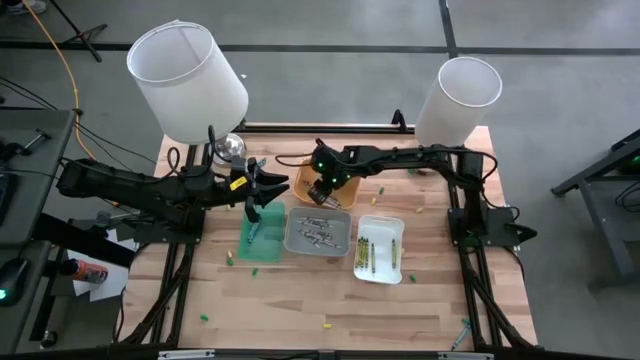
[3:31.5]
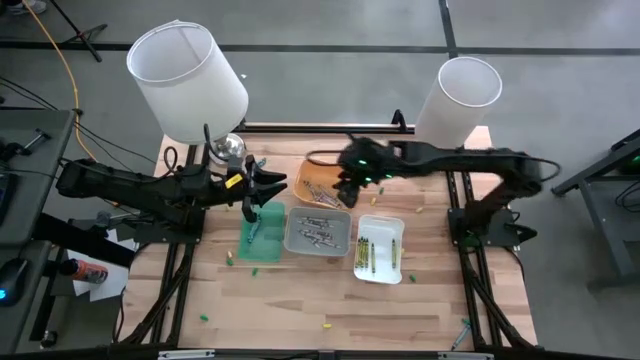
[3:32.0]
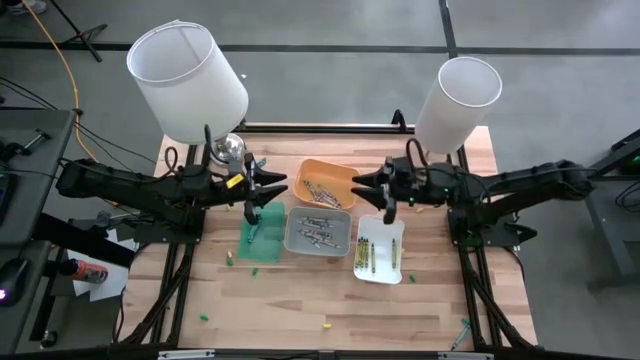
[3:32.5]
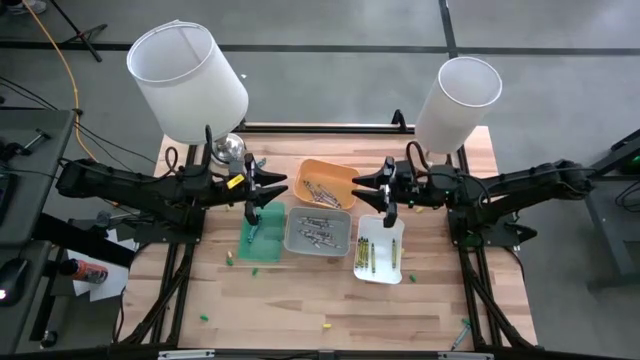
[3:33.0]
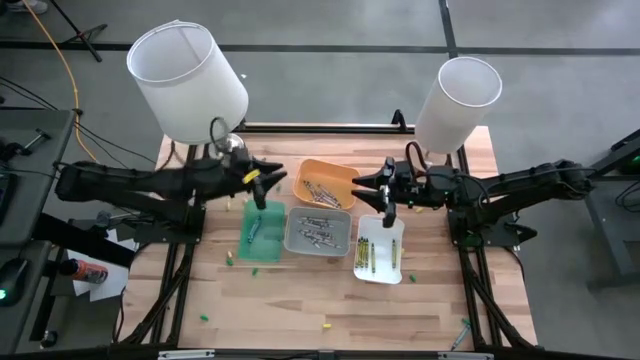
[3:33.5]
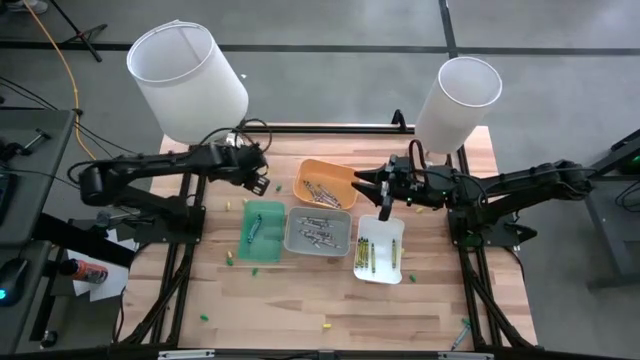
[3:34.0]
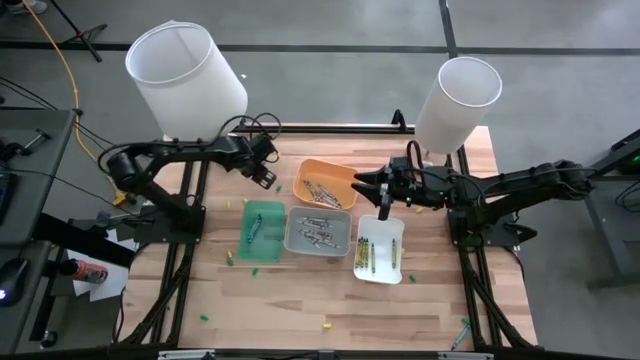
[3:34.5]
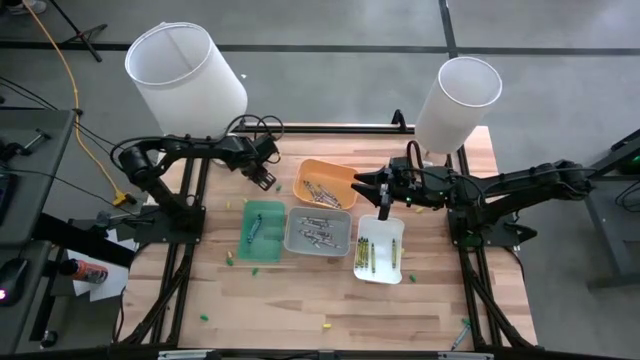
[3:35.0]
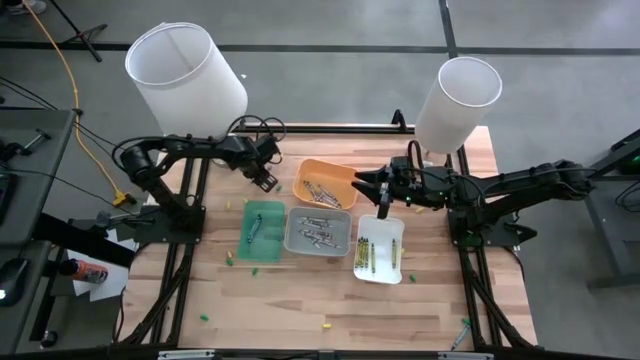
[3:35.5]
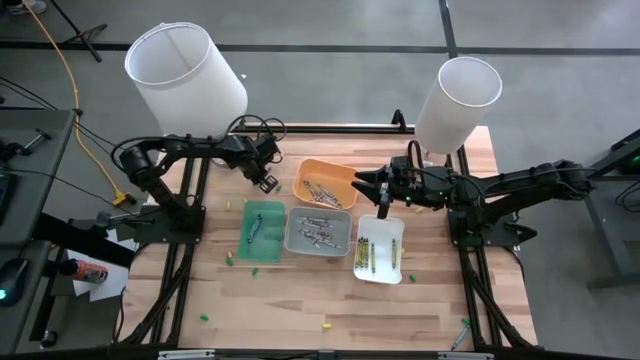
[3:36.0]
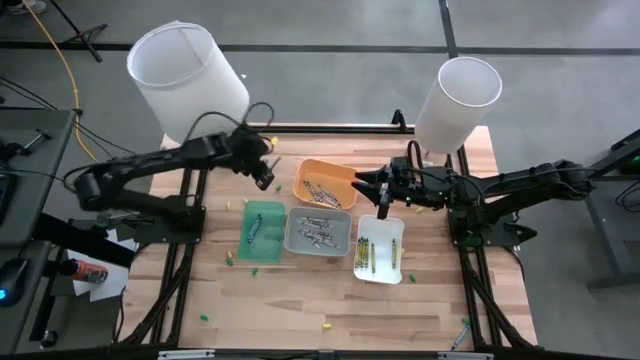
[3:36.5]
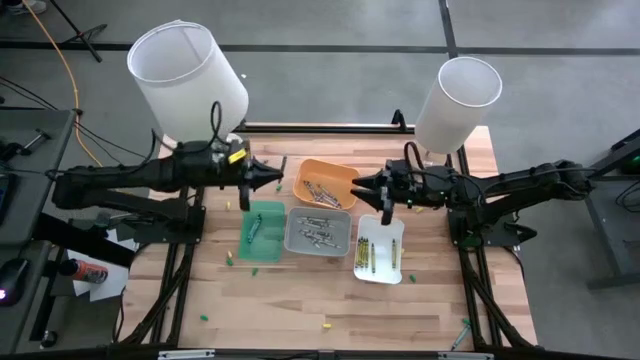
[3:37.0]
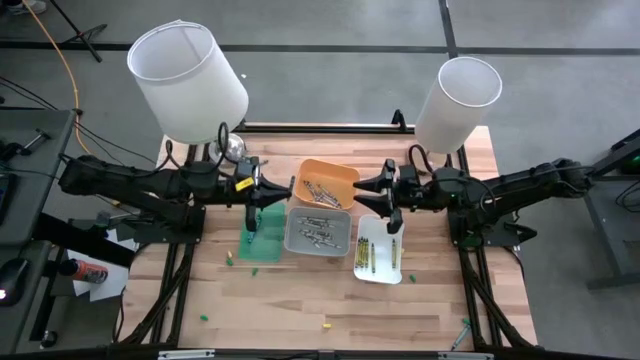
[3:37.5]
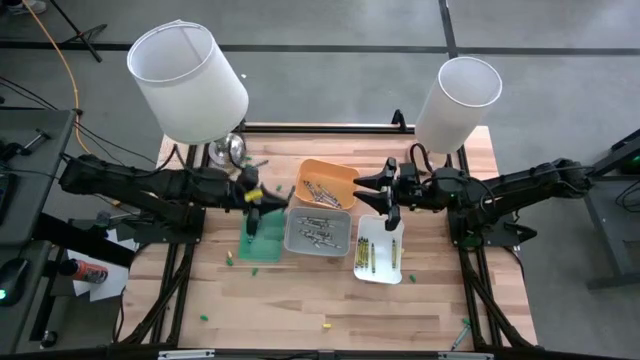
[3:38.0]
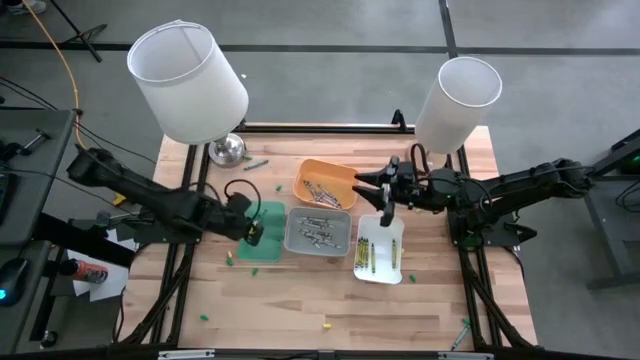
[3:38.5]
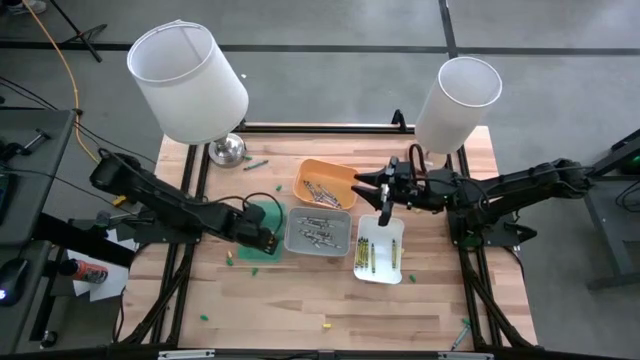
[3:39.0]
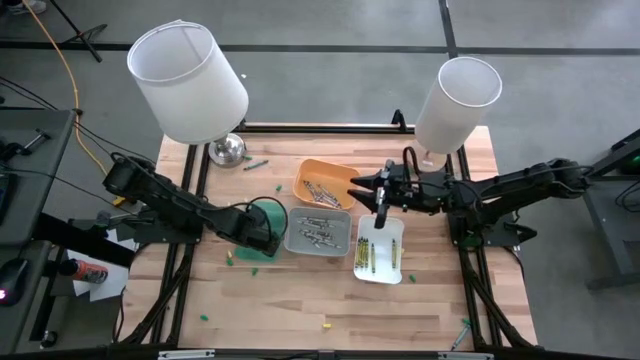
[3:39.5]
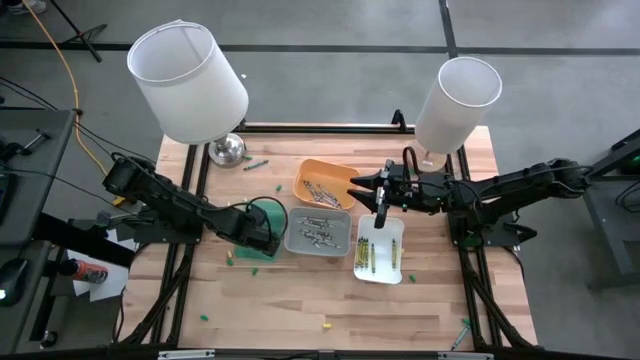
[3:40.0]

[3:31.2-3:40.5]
Task: Sort crayons
Put the blue crayon into the light blue bin

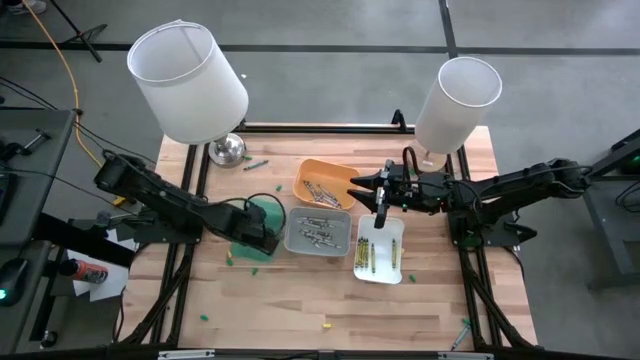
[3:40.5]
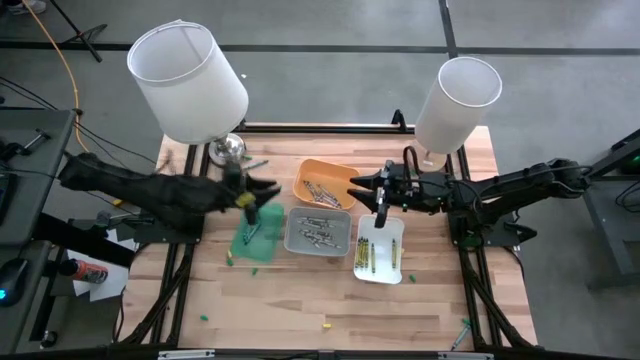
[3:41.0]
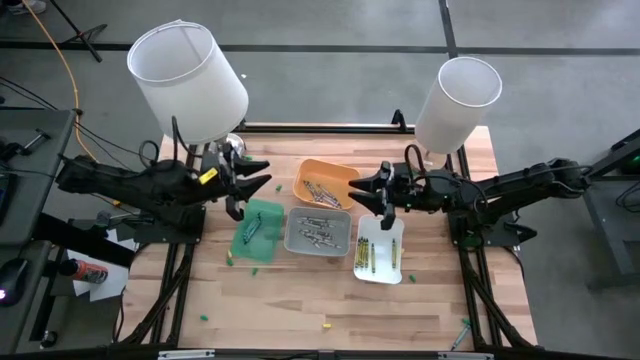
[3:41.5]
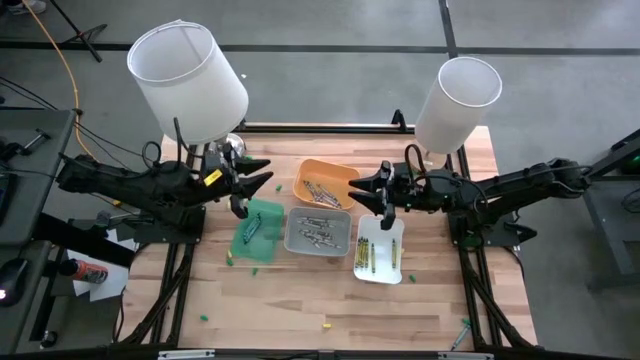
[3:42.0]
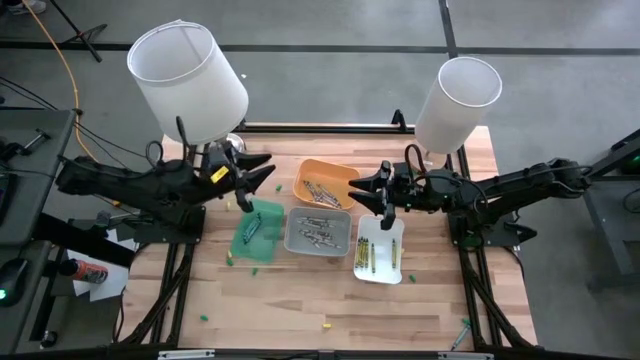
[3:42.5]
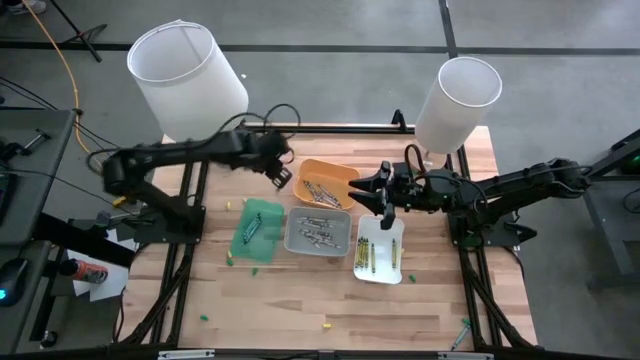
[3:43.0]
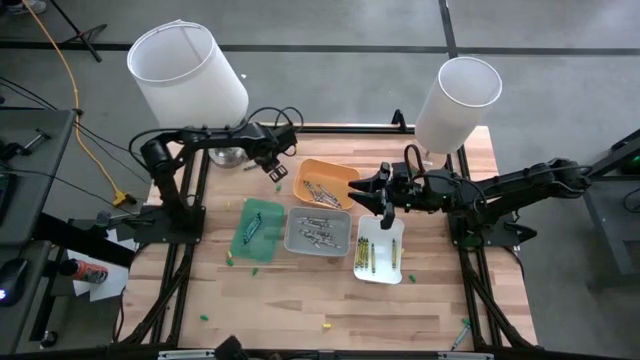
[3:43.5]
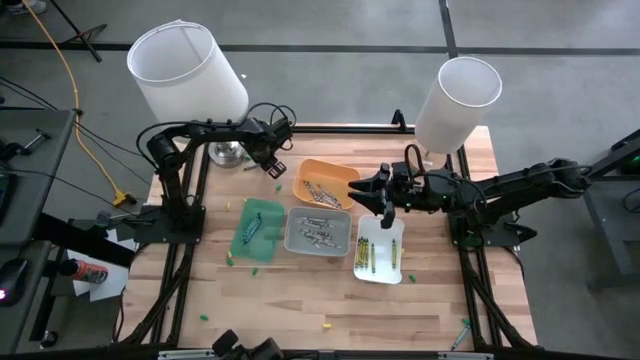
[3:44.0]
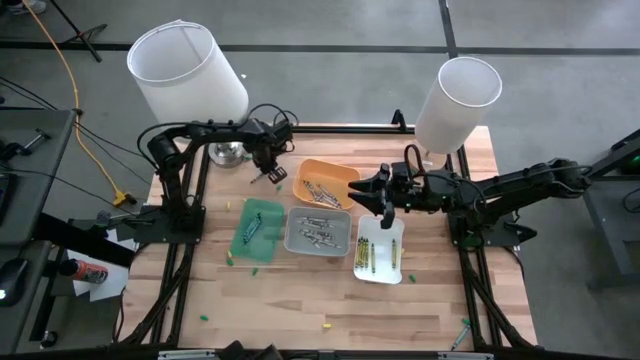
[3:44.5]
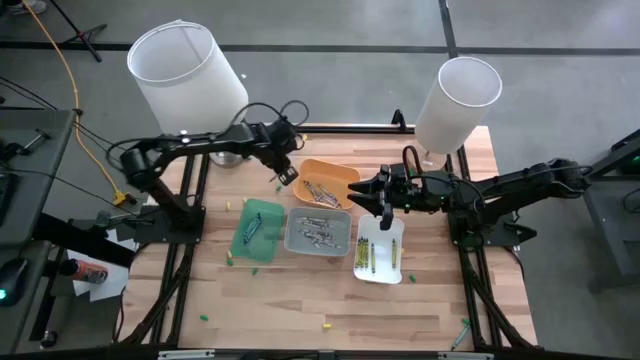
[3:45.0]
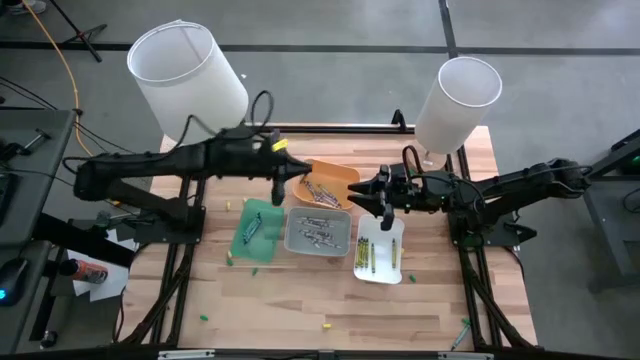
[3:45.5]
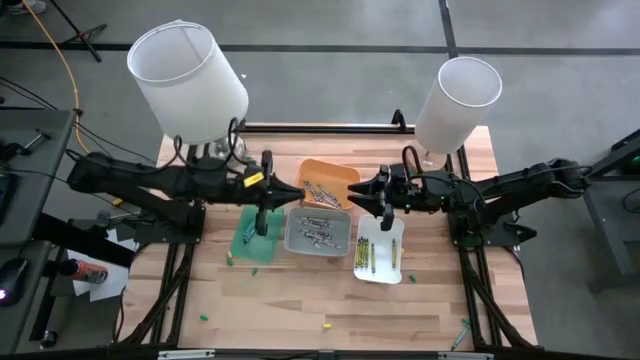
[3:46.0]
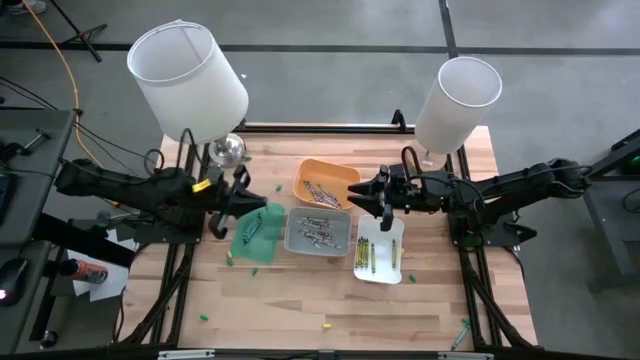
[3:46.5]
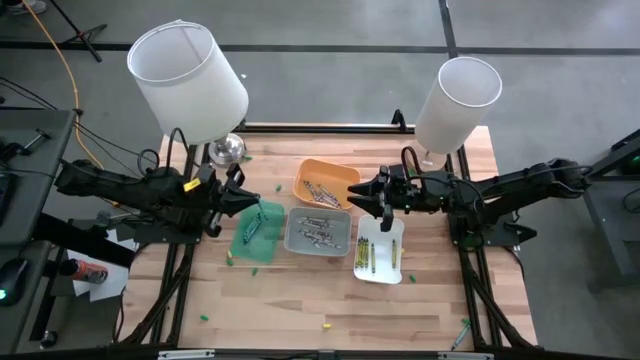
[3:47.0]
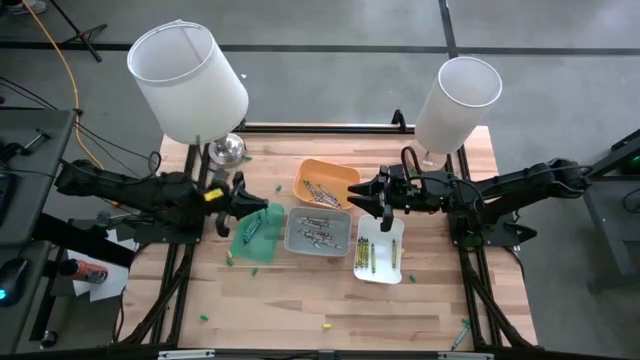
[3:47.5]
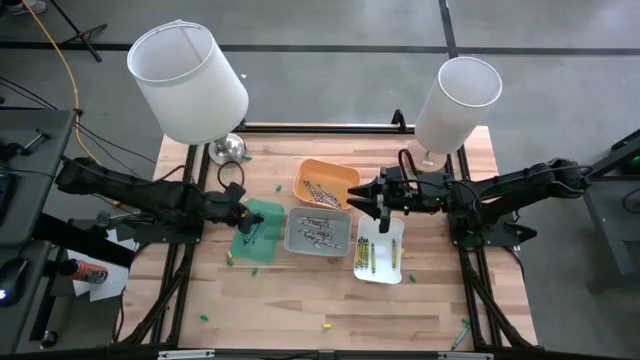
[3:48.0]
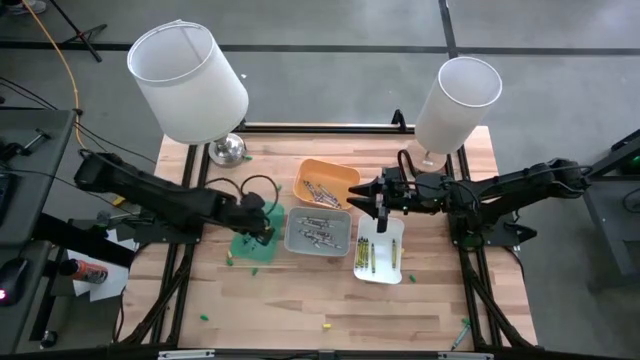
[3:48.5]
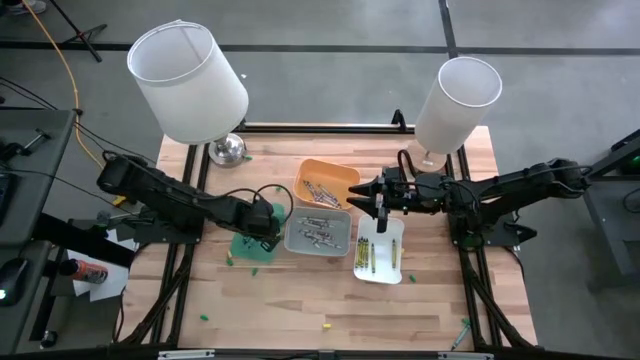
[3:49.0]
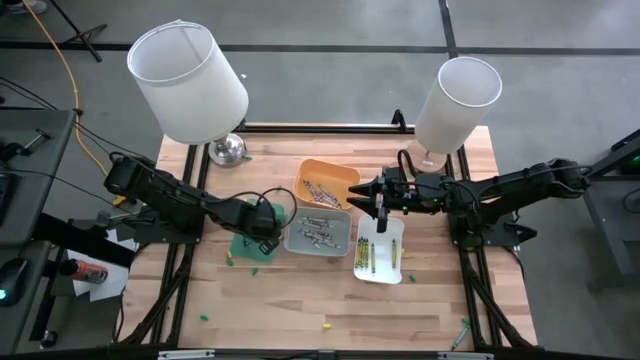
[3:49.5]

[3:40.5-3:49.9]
Put the blue crayon into the light blue bin

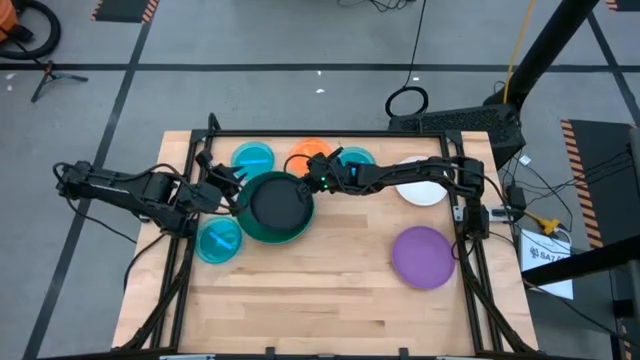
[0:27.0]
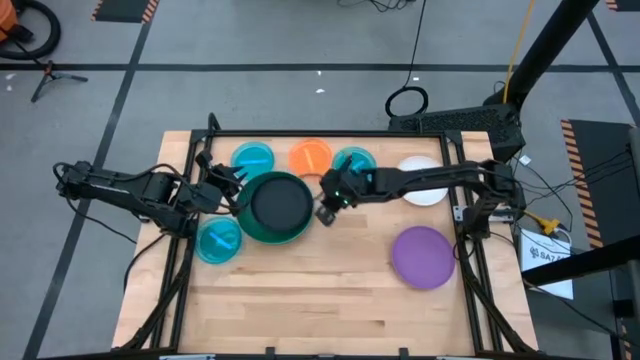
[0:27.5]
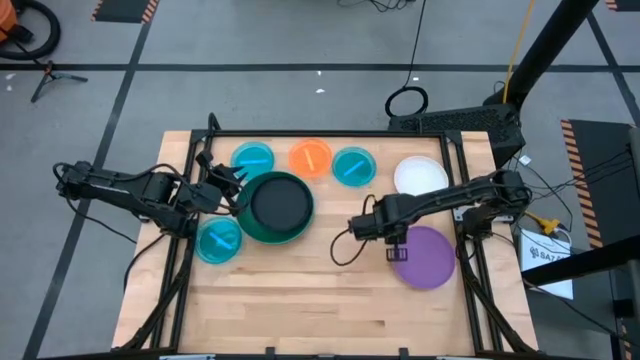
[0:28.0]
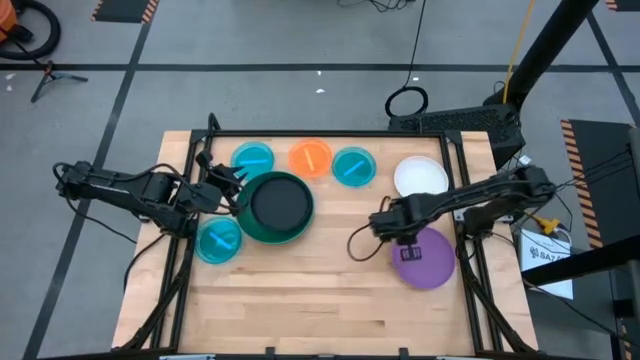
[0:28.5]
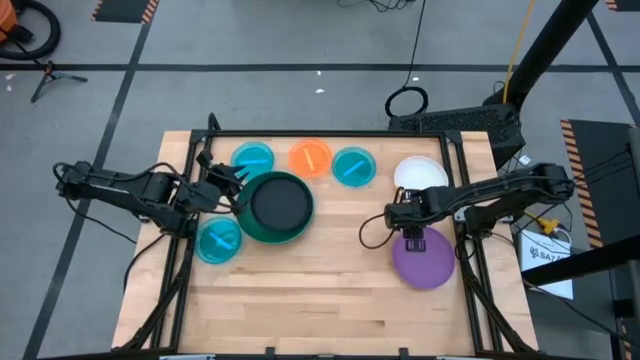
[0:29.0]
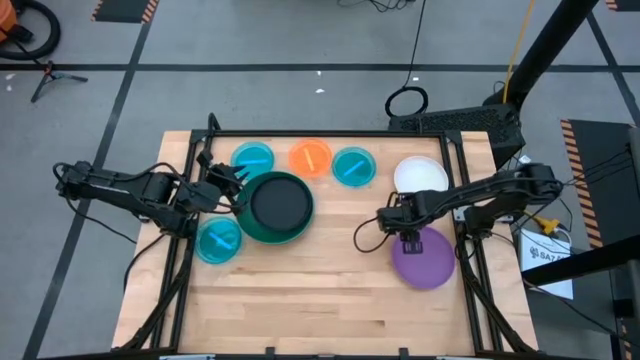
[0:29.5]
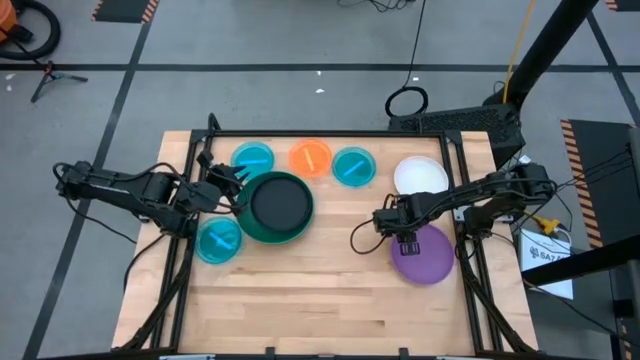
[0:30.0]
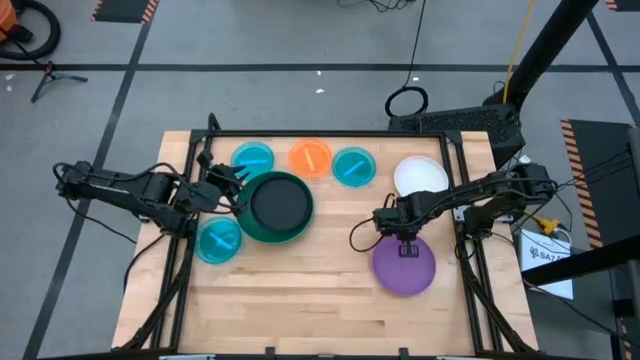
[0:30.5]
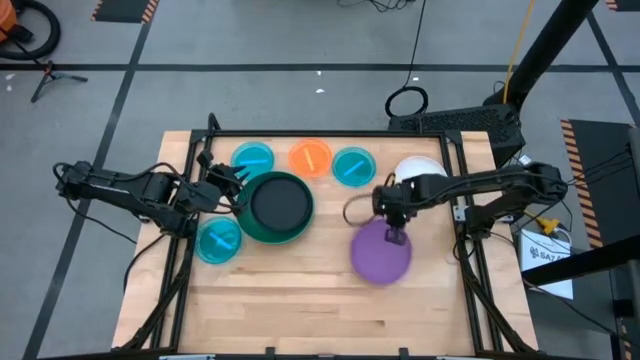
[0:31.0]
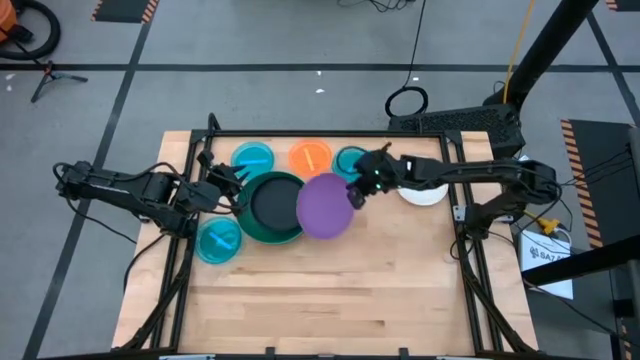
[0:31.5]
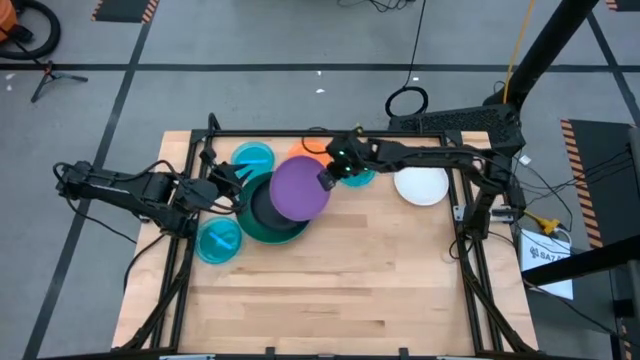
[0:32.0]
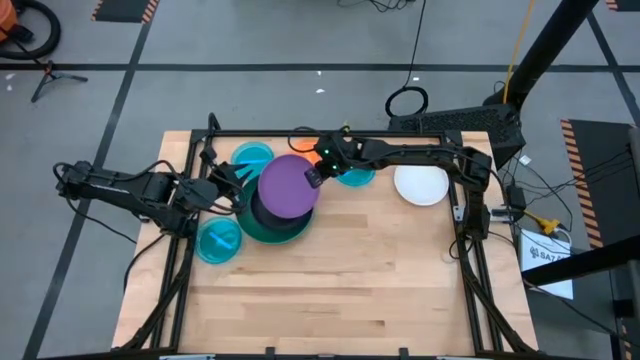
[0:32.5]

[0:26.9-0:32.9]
Task: Stack plastic plates
Stack the purple plate on top of the black plate
